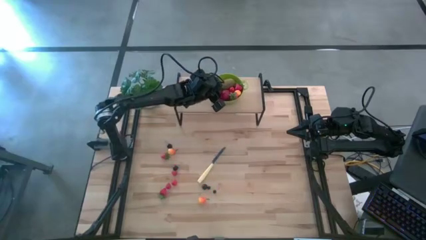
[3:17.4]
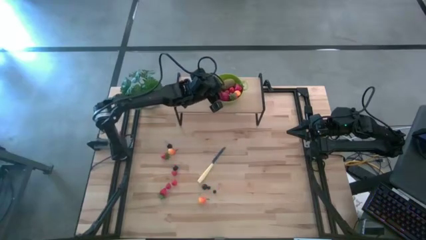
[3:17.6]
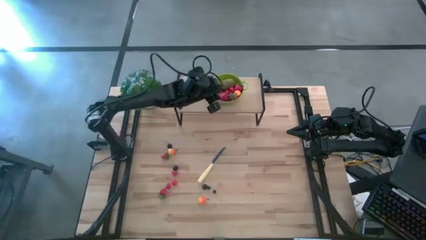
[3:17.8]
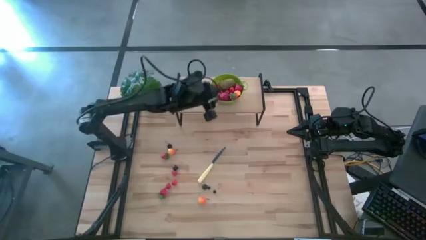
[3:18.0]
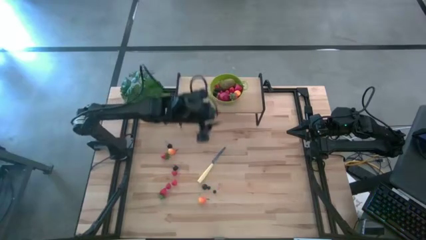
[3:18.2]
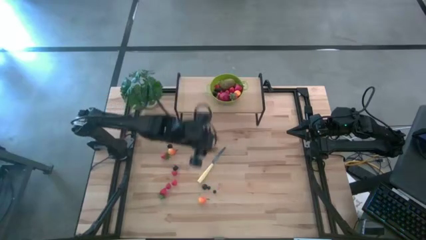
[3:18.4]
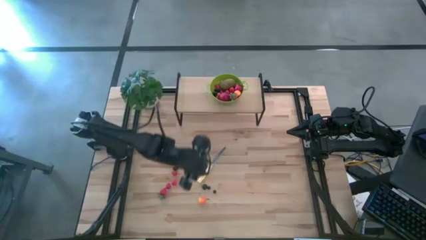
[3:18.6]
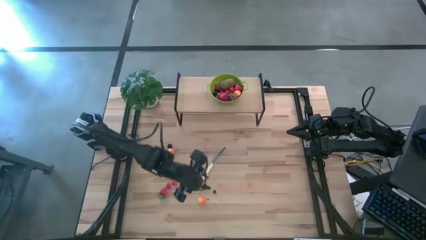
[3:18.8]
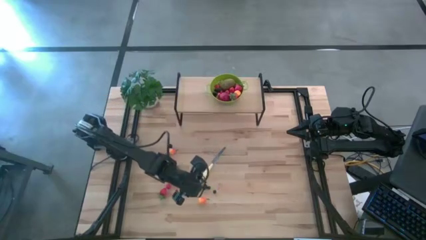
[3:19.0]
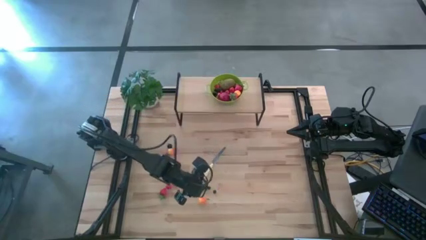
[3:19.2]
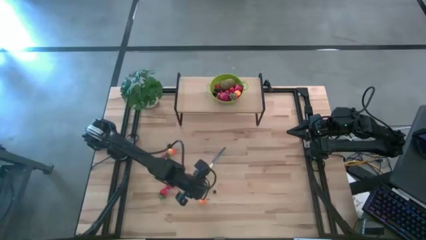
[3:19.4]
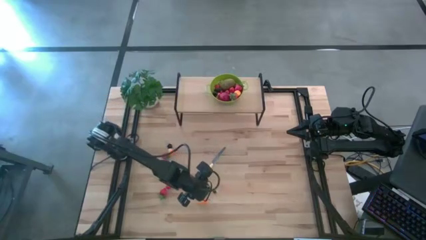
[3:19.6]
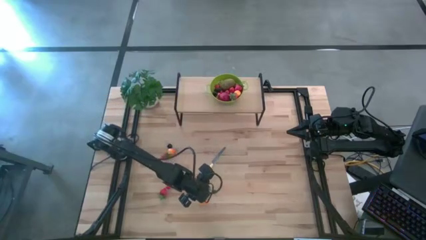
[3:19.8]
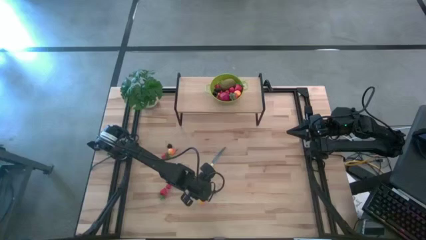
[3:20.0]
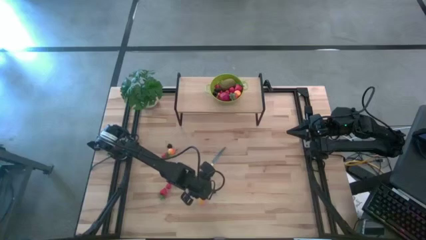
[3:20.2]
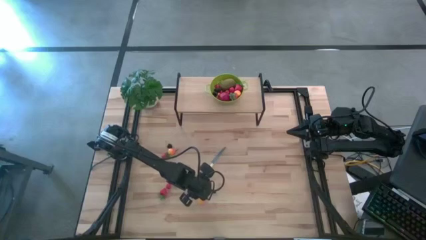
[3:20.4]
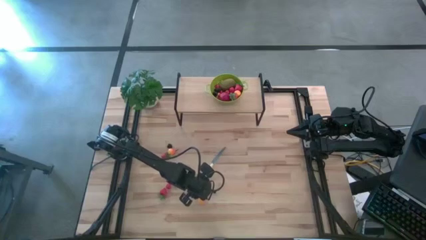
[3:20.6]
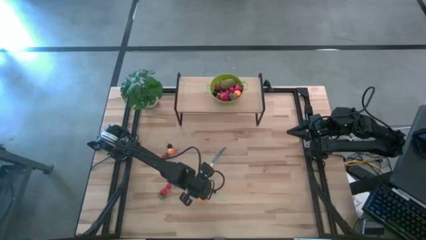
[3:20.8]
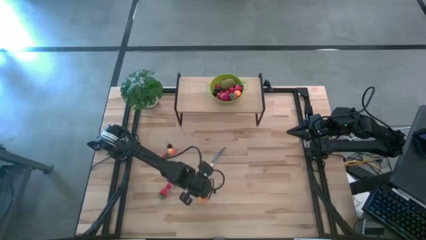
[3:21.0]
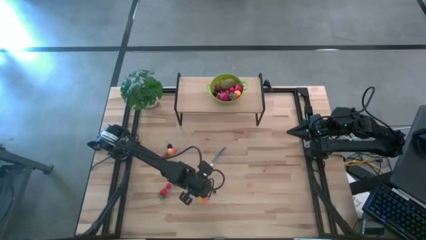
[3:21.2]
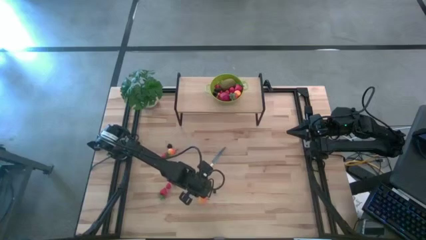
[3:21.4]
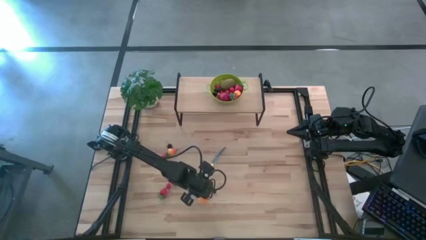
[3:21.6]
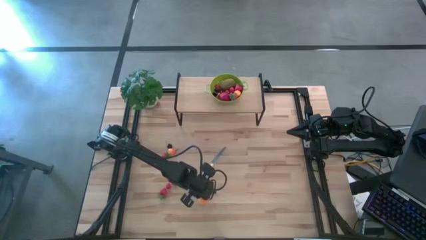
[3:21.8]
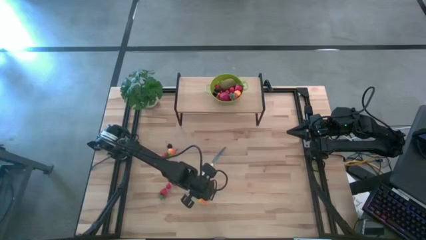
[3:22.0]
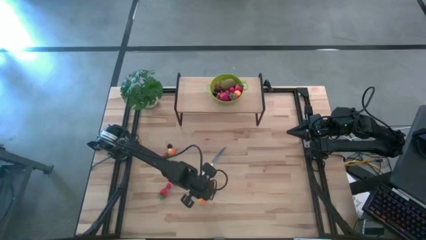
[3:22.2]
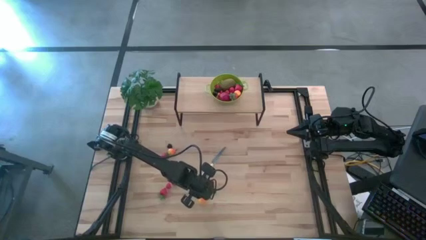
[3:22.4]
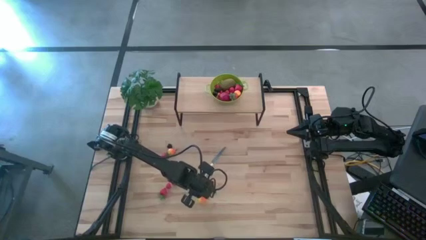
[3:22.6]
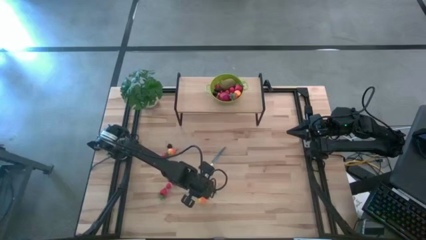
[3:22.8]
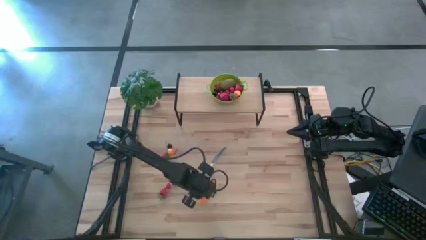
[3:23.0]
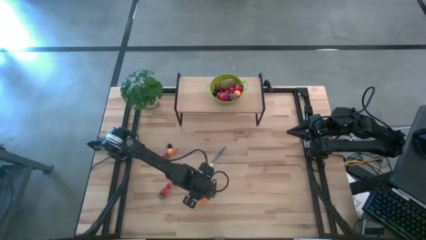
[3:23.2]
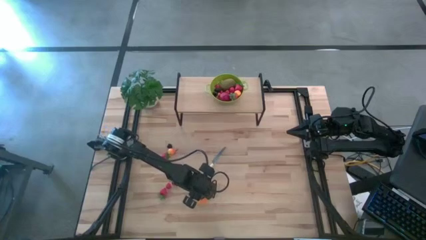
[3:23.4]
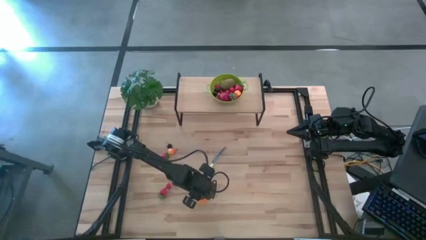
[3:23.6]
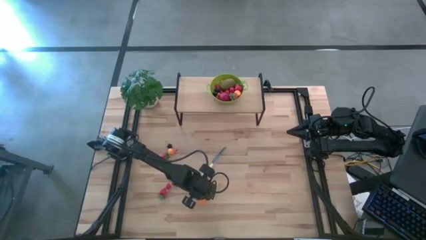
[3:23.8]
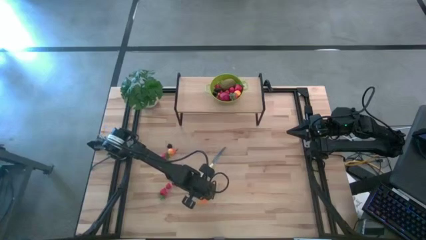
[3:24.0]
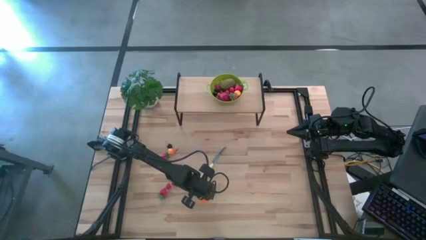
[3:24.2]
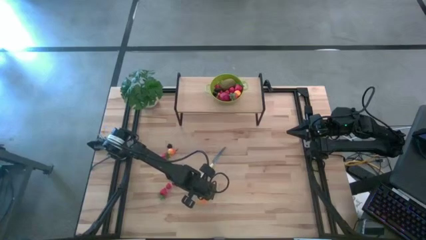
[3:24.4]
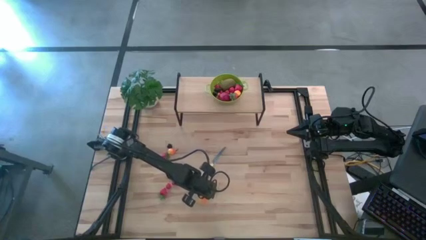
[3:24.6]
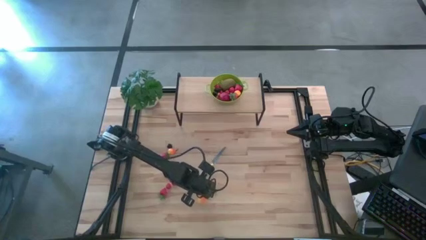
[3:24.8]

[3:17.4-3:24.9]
Task: Pick & Place Fruit
Put the black cherry into the strainer bowl

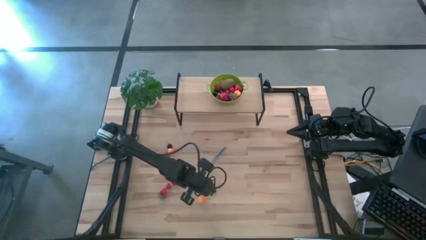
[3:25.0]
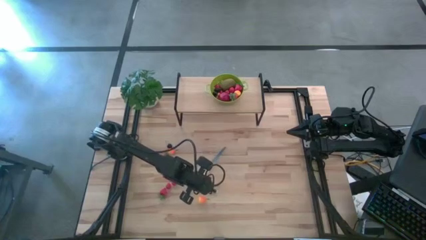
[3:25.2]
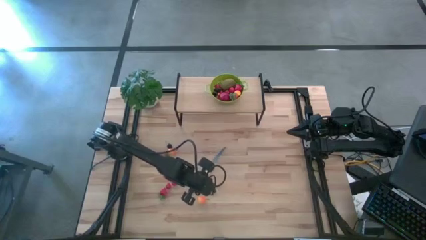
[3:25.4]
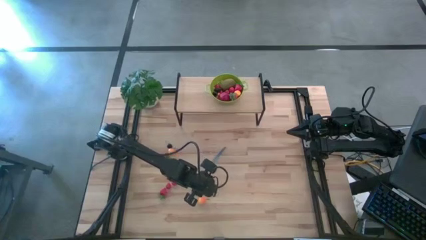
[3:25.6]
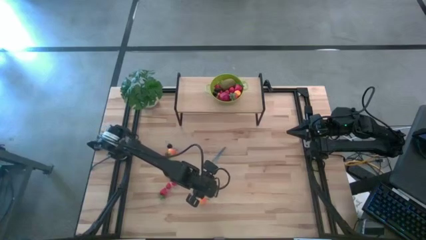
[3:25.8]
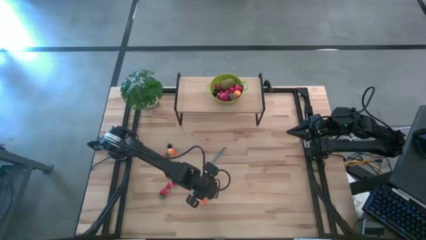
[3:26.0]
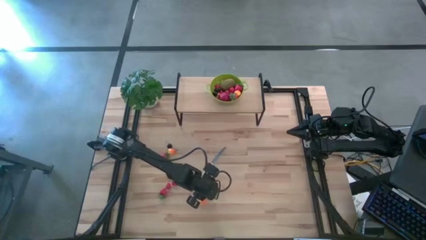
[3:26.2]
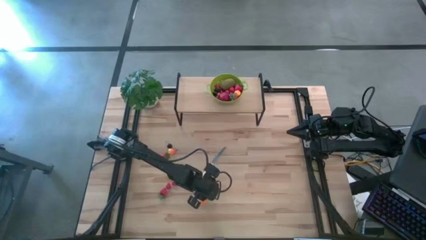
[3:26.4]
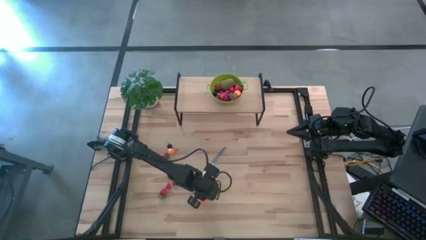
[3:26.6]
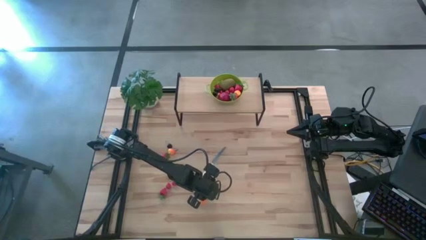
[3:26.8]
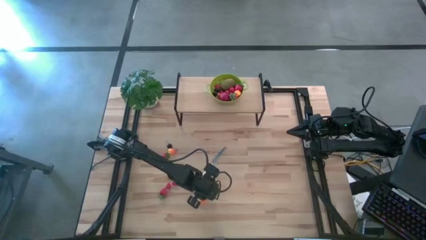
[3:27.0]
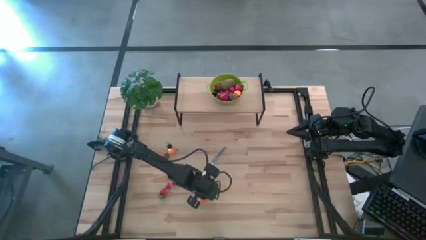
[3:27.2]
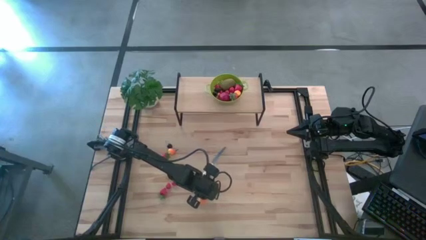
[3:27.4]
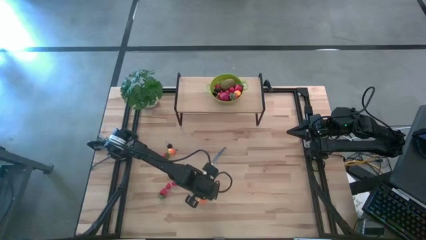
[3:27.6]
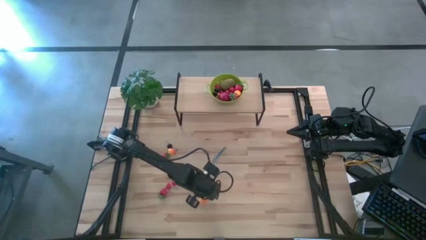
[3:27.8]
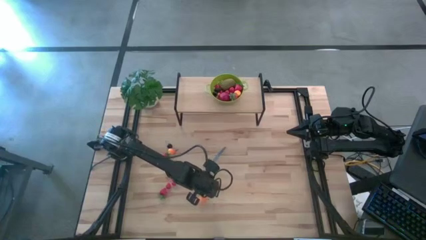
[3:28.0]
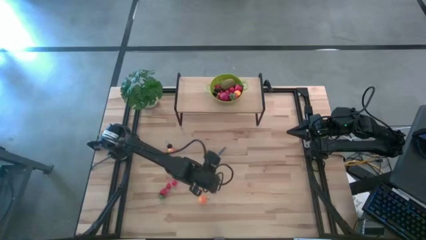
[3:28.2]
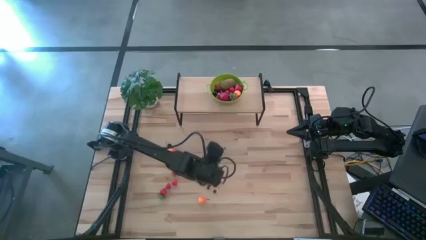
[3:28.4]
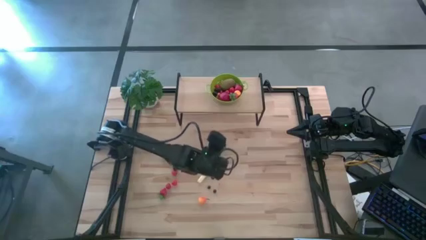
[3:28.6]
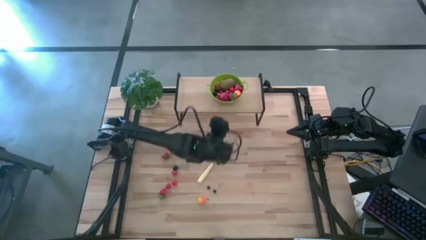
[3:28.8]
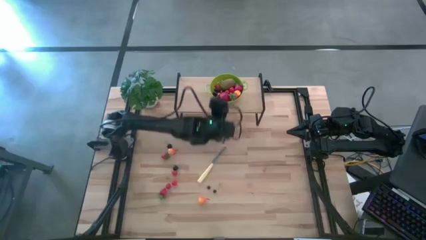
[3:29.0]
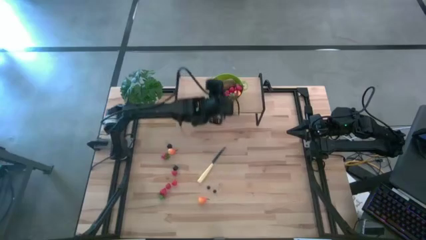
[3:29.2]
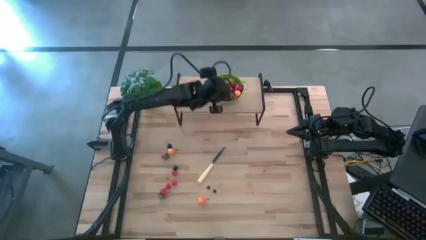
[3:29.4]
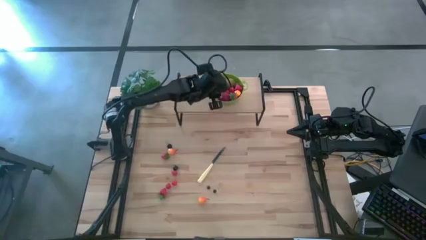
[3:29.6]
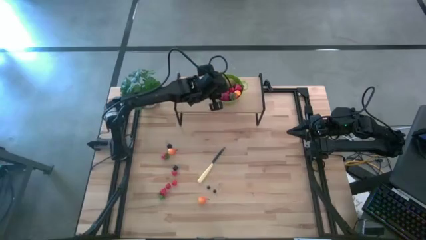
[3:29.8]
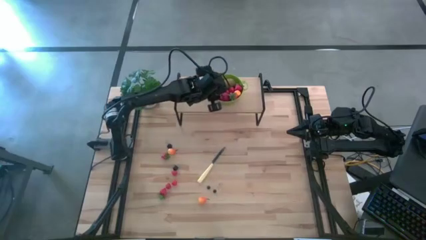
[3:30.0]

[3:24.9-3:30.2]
Put the black cherry into the strainer bowl

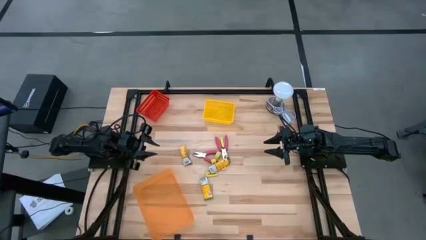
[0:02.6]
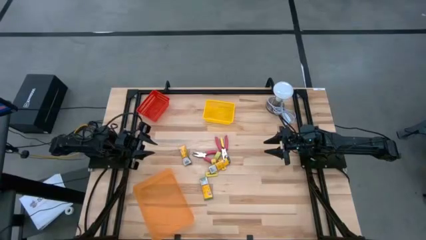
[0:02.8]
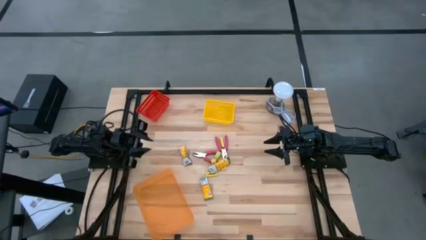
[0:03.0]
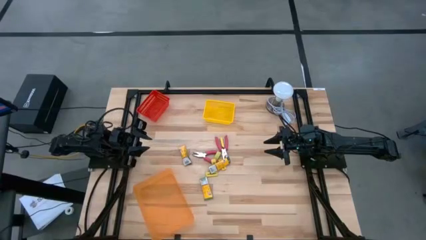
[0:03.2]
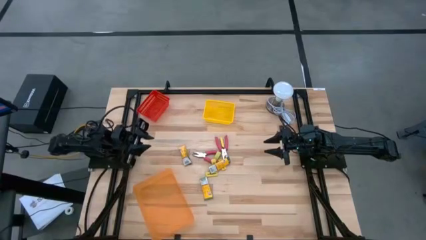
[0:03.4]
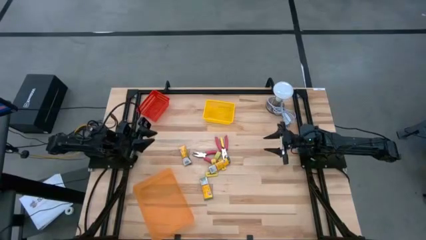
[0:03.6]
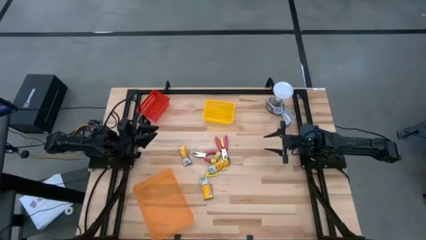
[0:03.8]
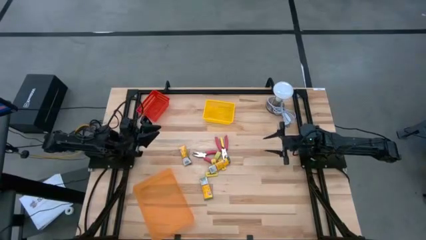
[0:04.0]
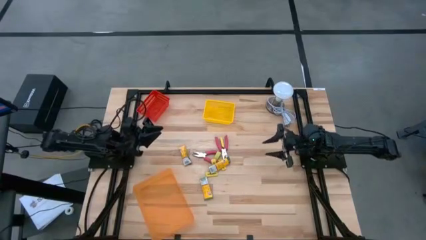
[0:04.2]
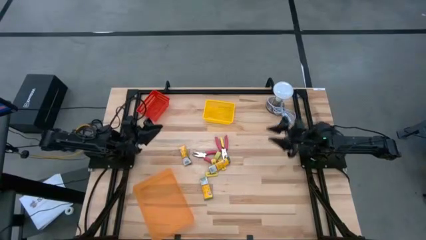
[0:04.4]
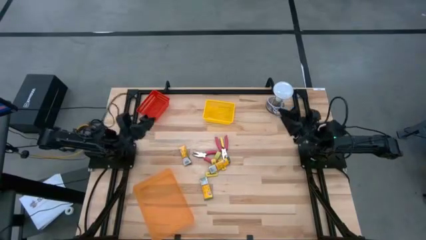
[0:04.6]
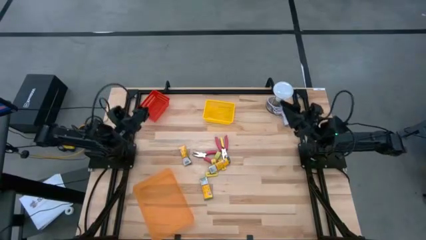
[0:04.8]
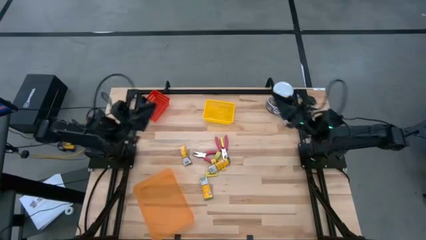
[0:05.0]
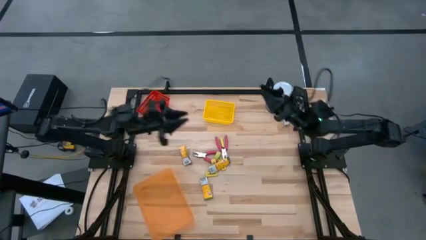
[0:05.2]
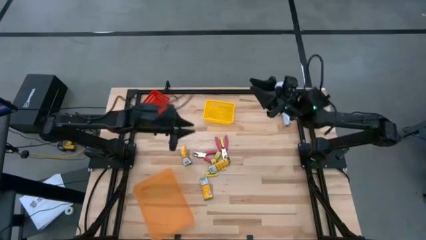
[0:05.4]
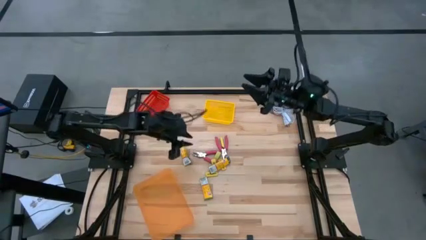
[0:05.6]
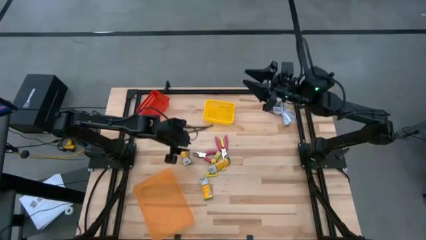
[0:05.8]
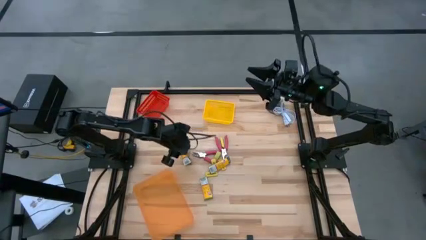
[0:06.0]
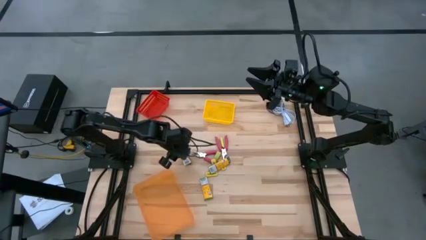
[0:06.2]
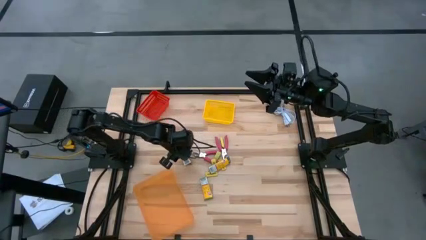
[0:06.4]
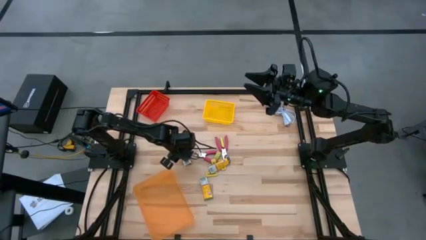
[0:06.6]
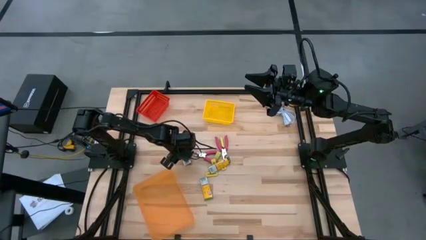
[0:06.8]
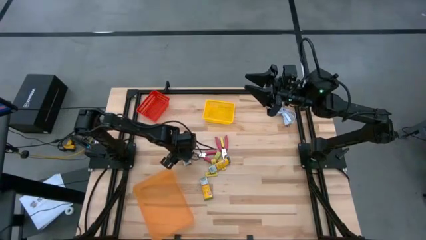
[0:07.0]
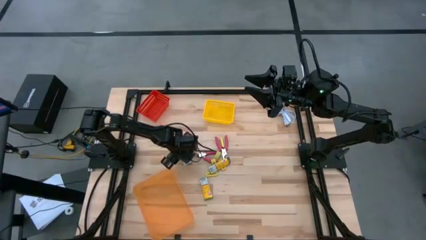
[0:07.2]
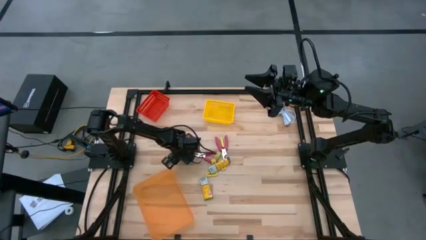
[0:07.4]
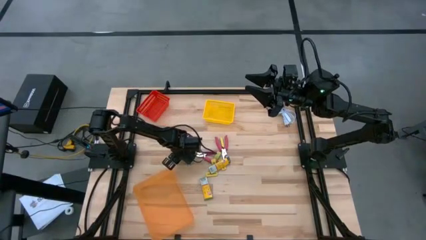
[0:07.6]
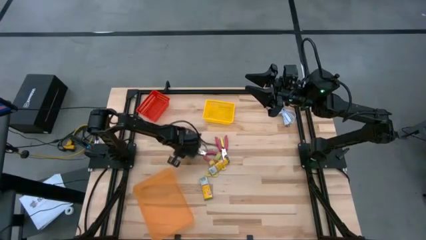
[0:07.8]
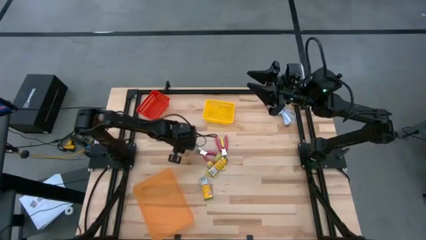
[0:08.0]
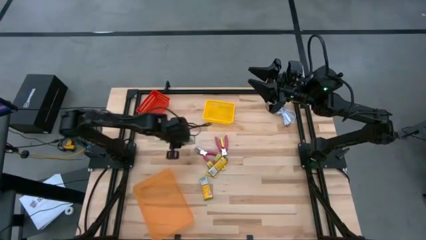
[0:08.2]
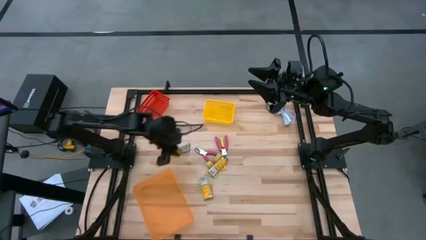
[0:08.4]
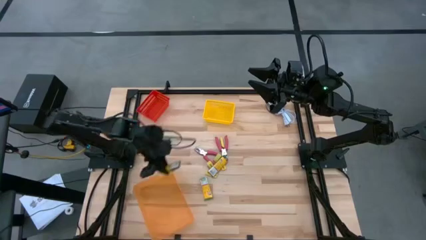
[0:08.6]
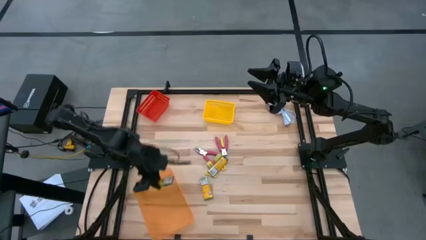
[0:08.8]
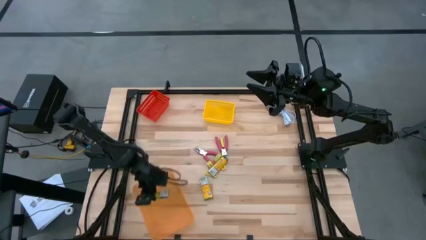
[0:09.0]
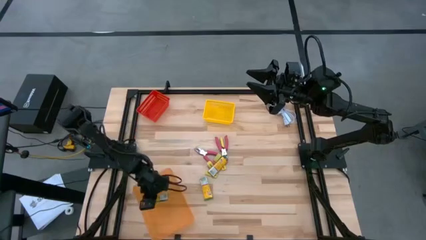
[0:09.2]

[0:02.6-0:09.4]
Task: Pick & Place School Supplies
Put the yellow crayon box into the orange bin
